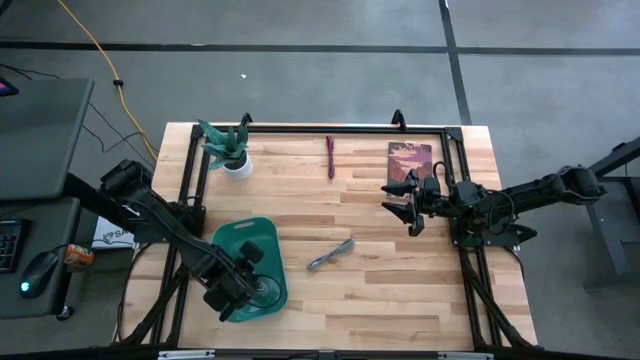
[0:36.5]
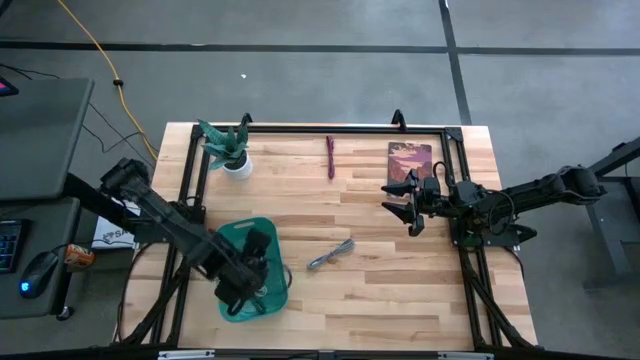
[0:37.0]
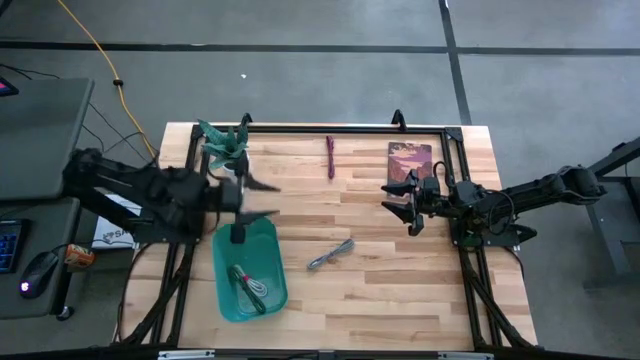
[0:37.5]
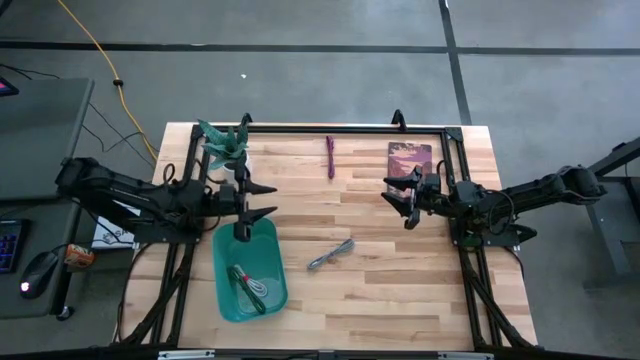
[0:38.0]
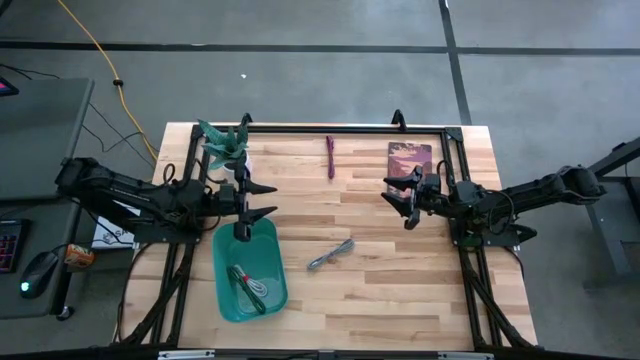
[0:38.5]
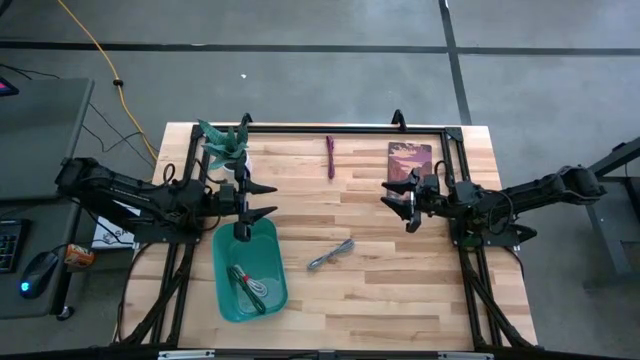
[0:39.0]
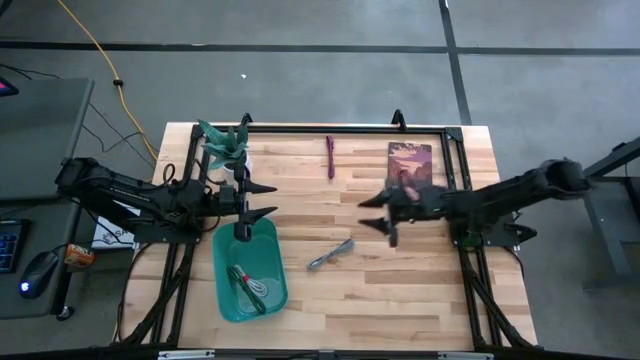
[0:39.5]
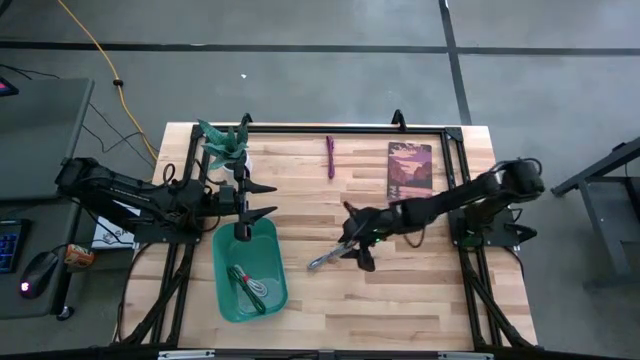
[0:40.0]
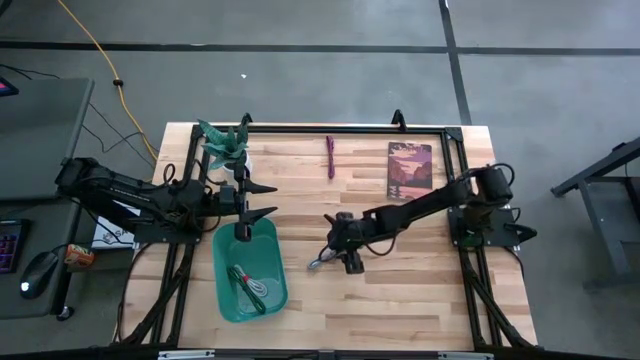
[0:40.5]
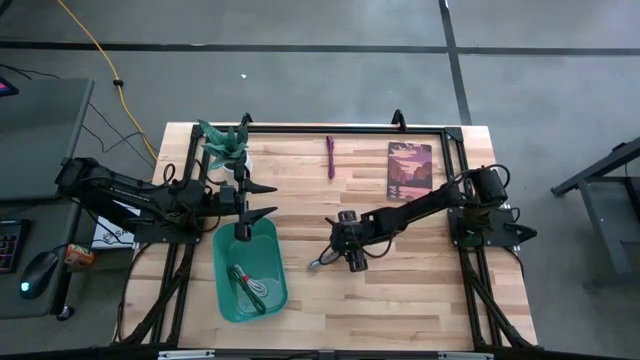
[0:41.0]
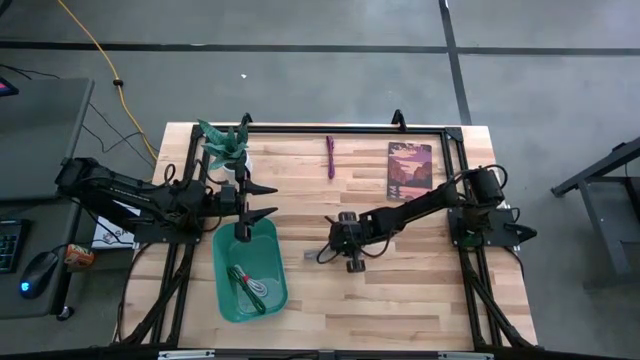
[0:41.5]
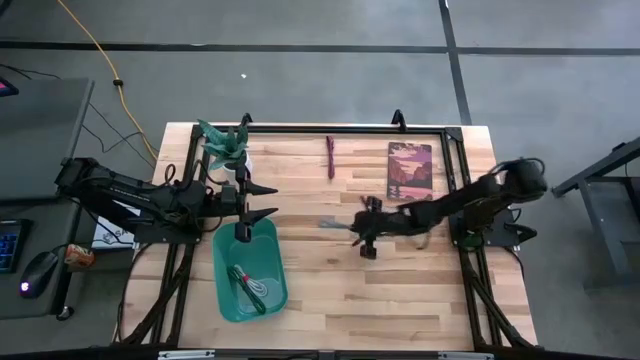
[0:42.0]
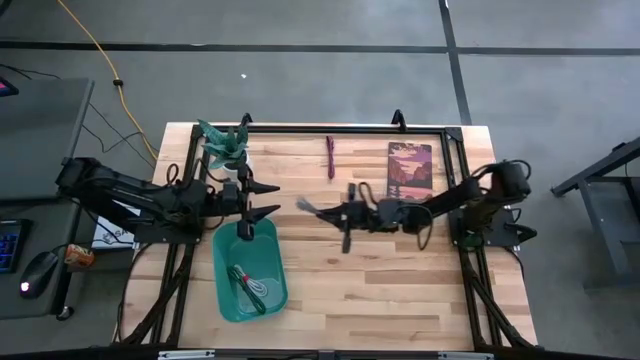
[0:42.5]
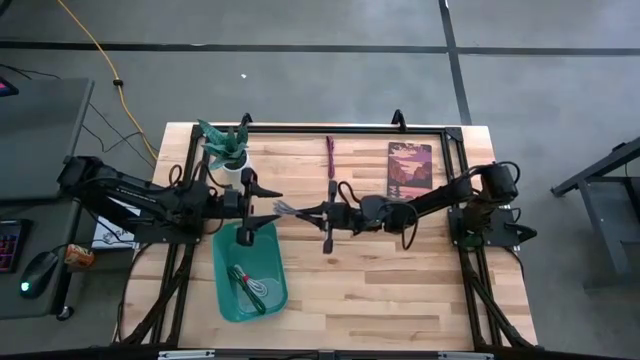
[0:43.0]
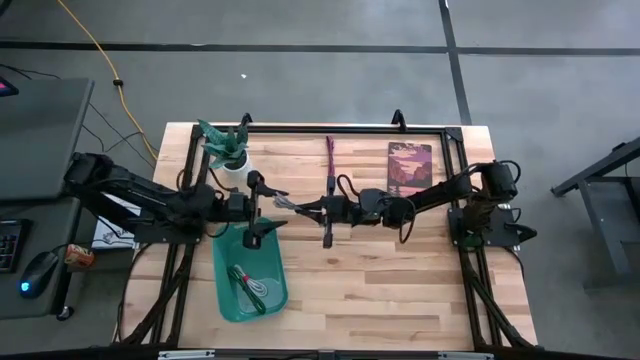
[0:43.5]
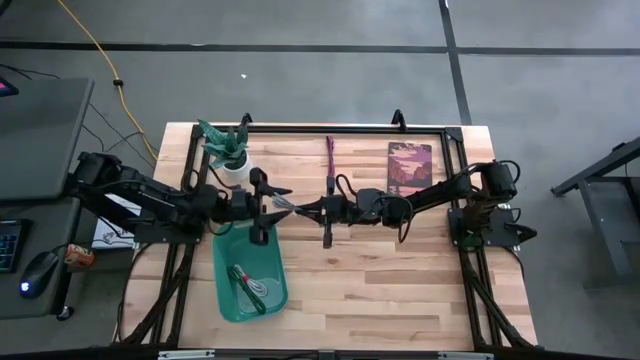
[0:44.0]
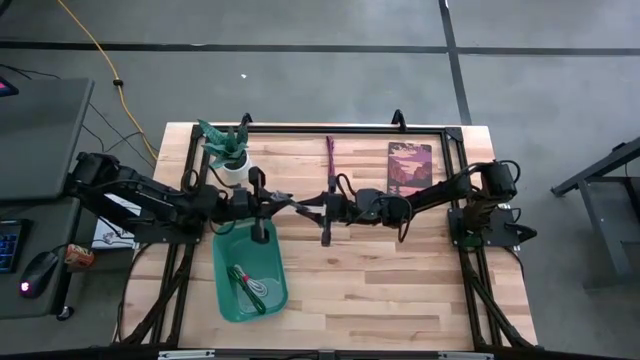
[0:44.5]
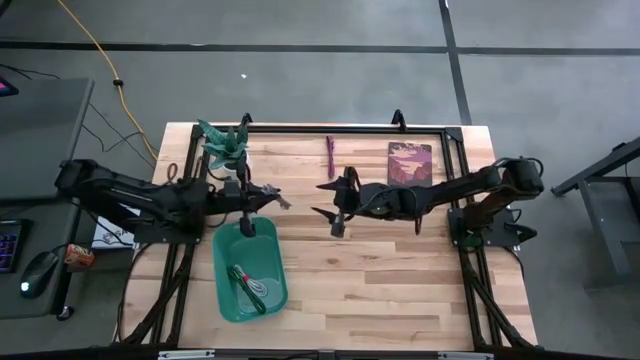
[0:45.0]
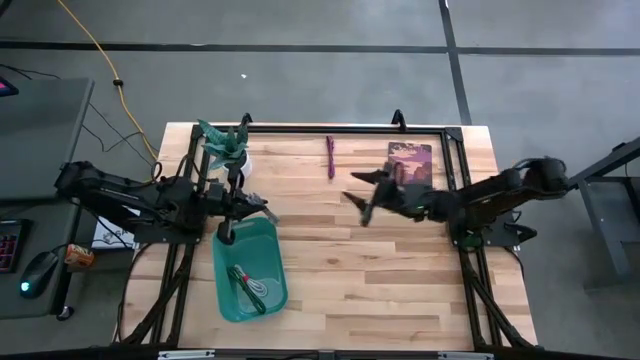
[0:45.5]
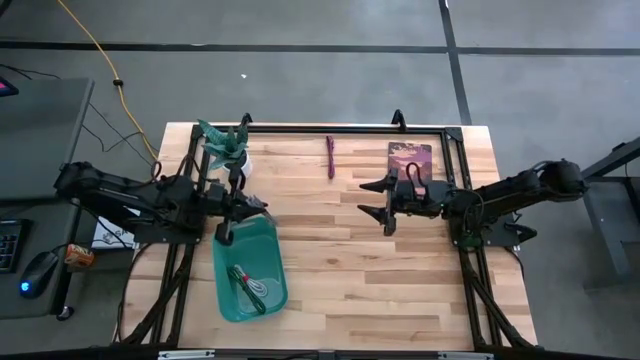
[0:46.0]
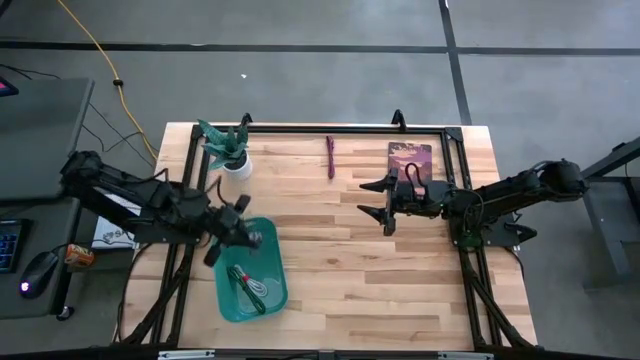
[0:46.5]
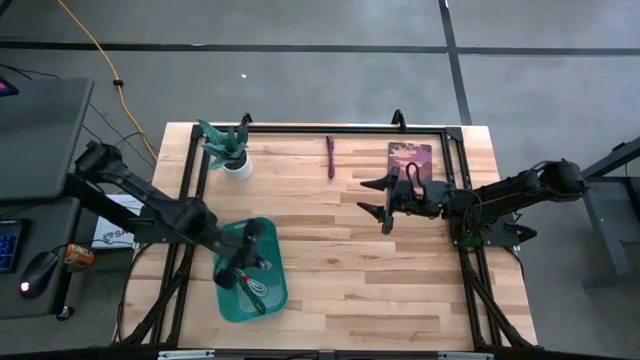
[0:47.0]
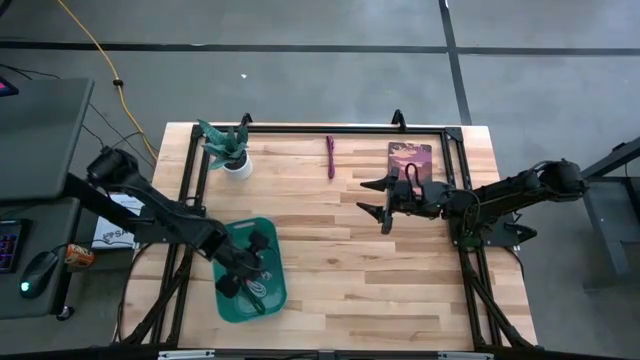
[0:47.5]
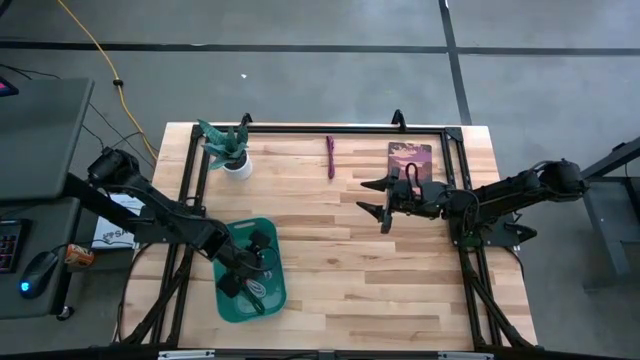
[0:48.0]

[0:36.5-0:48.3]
Task: Pick and place USB-C Cables
Put the white black charger cable into the green bin

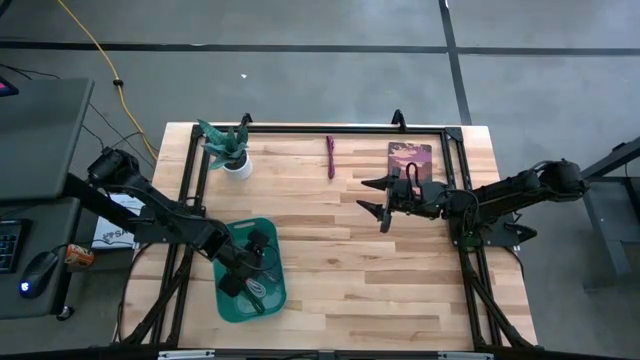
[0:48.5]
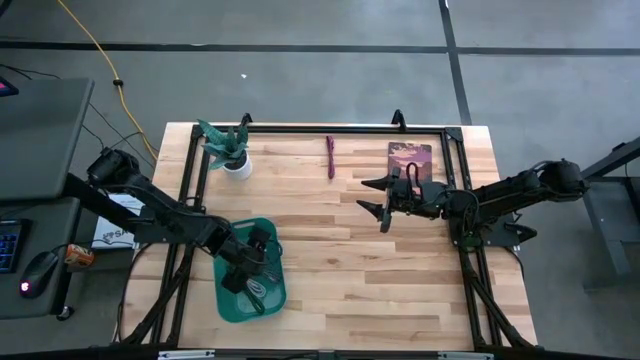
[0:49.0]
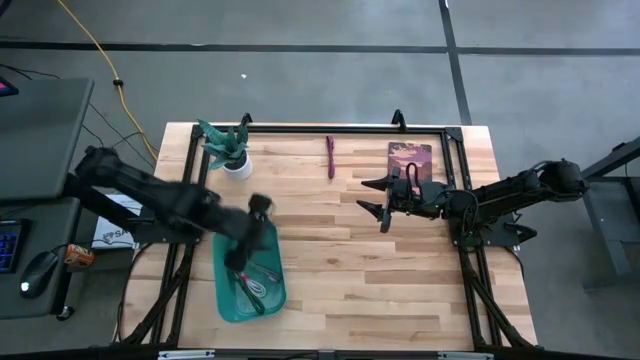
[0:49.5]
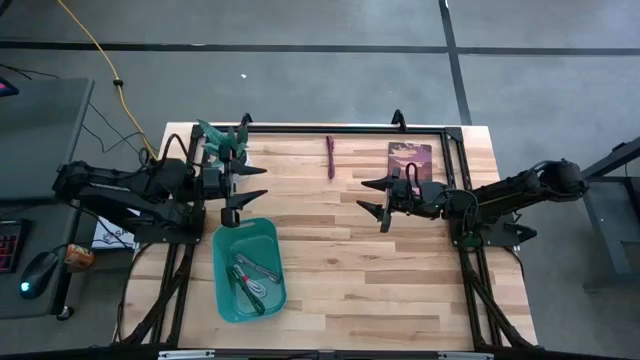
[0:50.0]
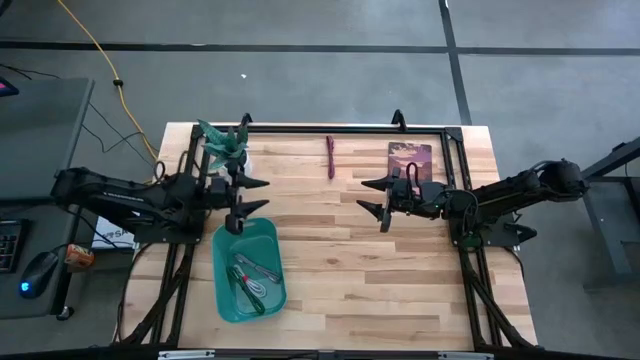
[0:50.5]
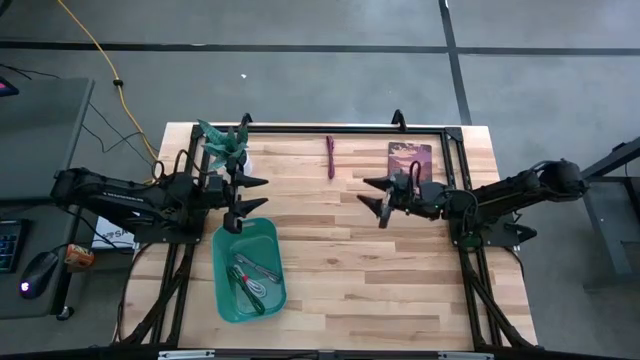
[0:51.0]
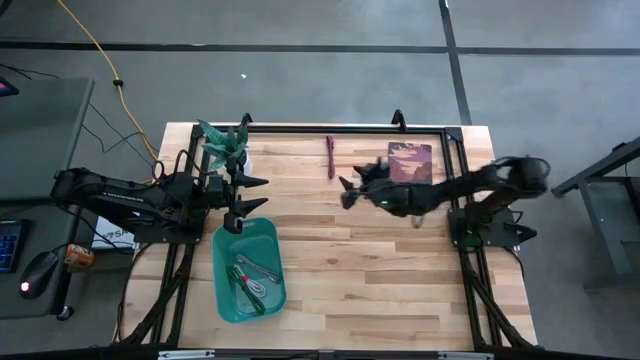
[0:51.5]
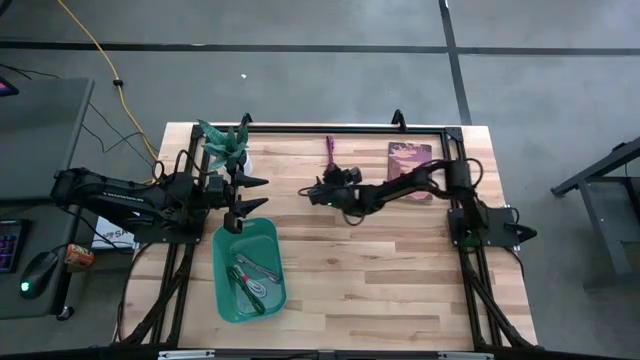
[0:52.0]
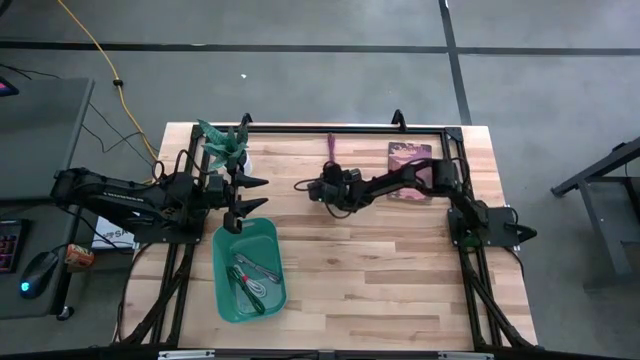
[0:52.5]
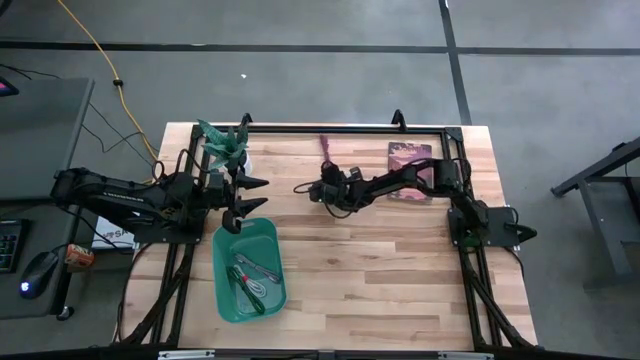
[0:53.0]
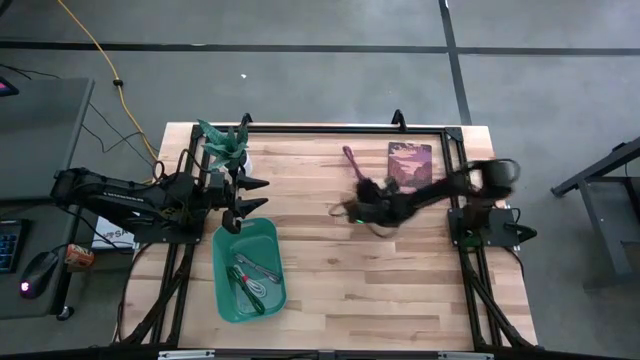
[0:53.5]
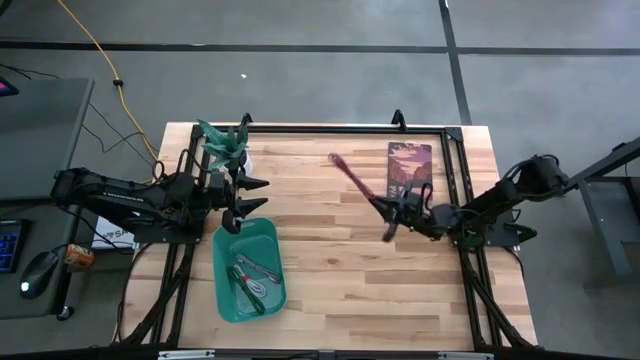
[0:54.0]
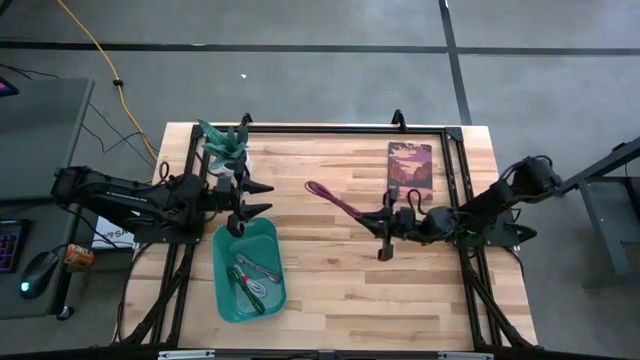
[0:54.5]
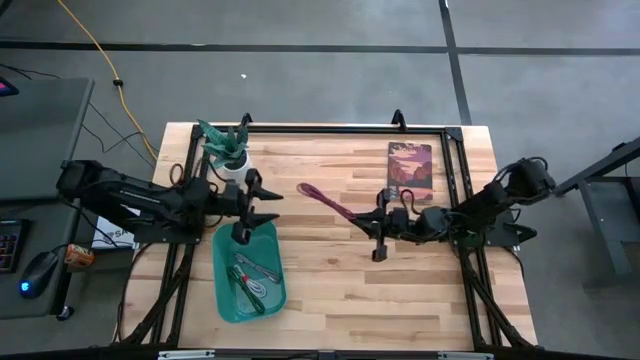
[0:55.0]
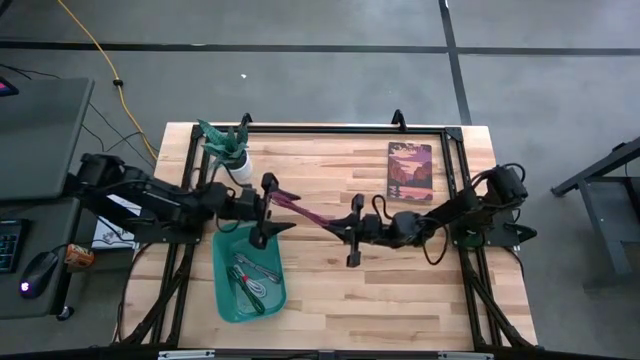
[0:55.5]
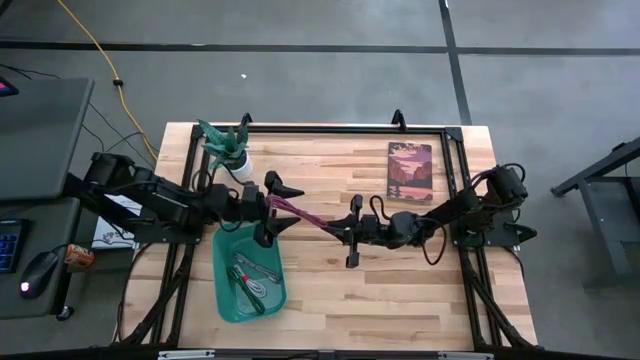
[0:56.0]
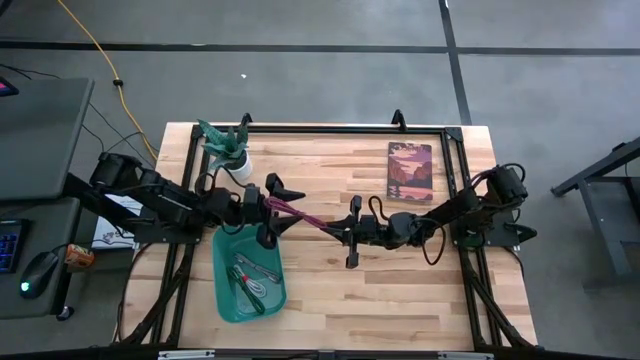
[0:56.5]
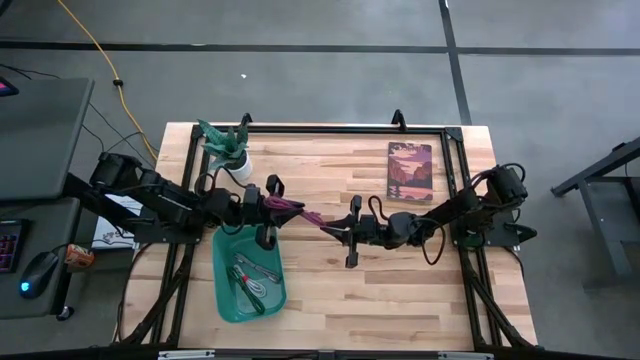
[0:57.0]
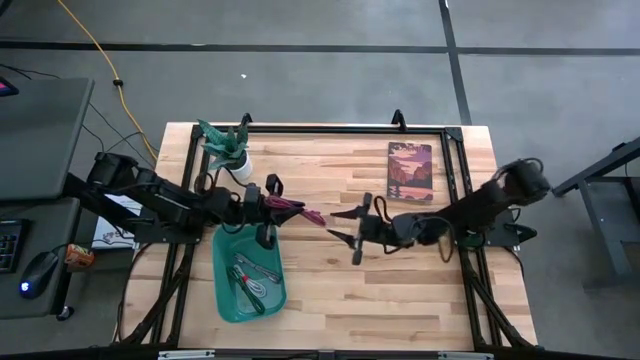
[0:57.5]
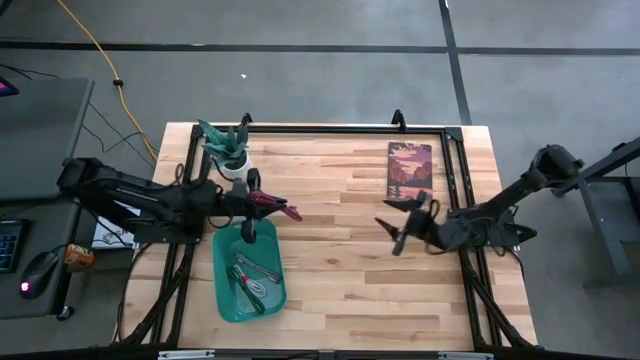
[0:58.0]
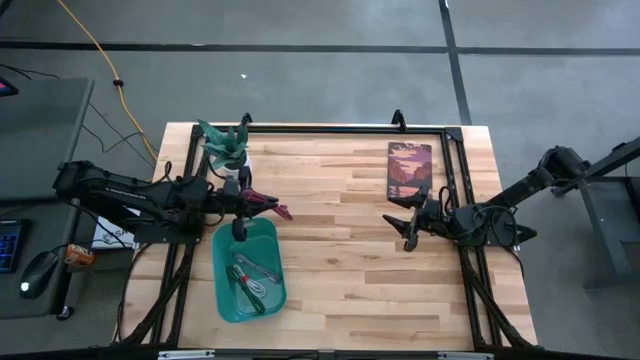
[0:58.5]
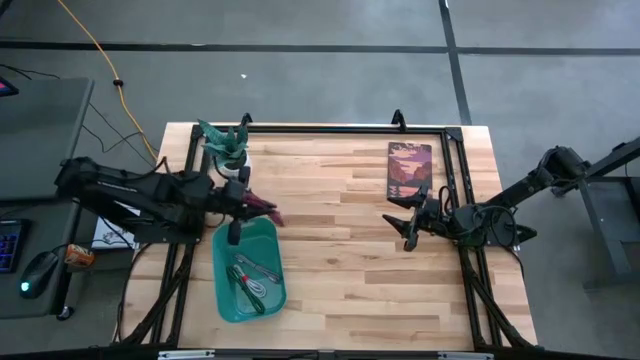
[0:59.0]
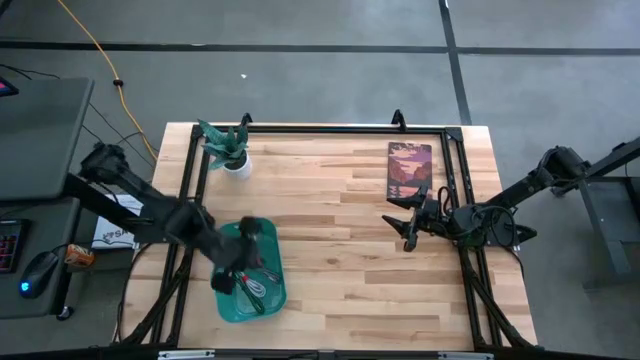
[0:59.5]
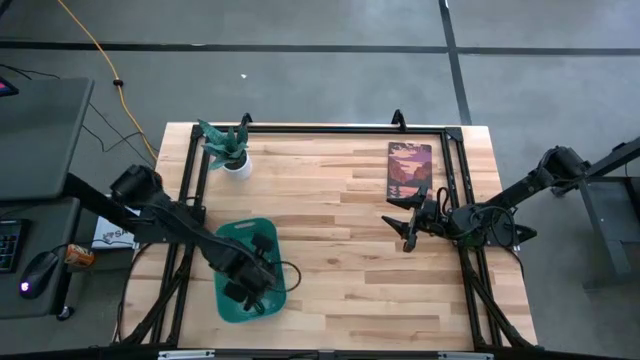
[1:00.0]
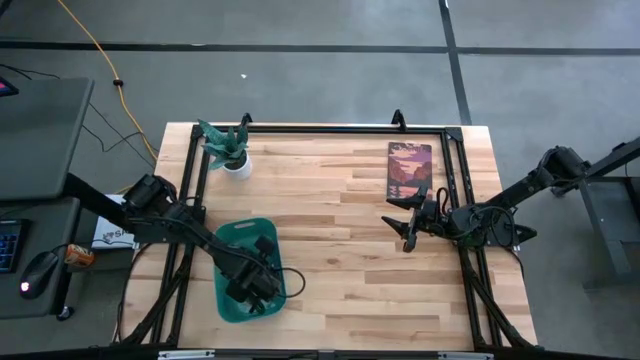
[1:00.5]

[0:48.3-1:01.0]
Put the pink black charger cable into the green bin
